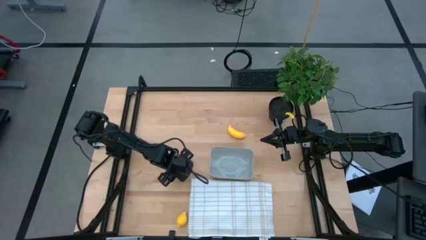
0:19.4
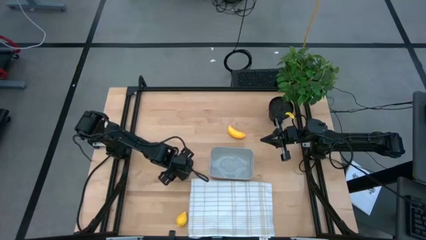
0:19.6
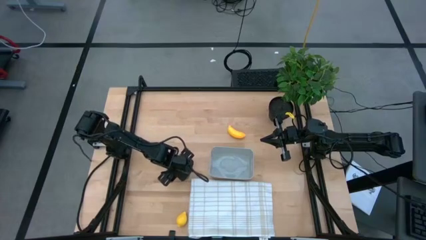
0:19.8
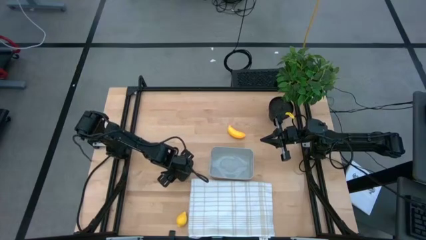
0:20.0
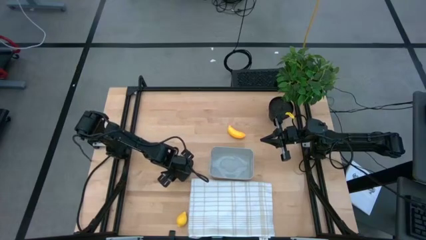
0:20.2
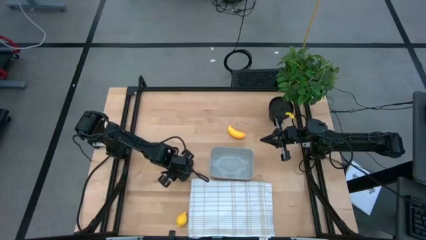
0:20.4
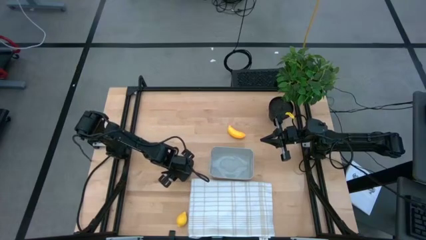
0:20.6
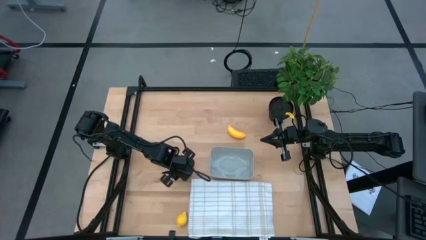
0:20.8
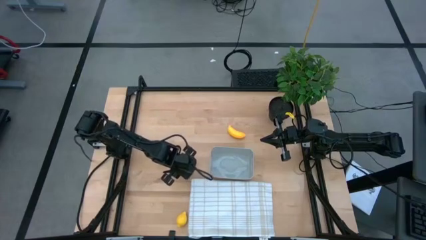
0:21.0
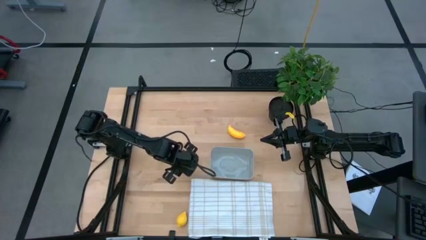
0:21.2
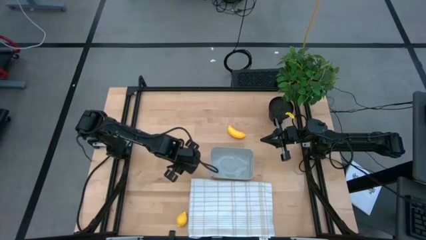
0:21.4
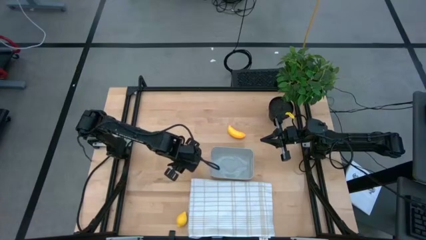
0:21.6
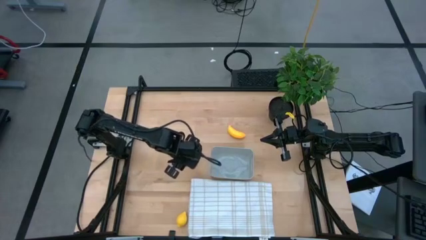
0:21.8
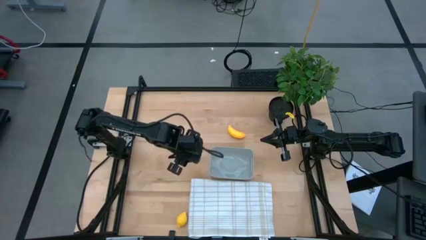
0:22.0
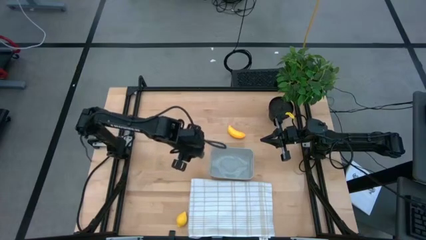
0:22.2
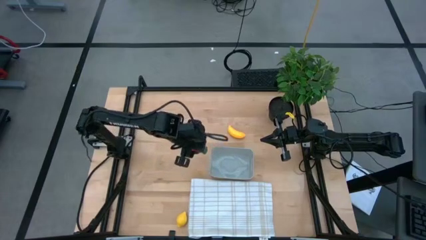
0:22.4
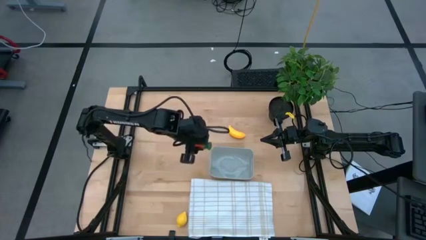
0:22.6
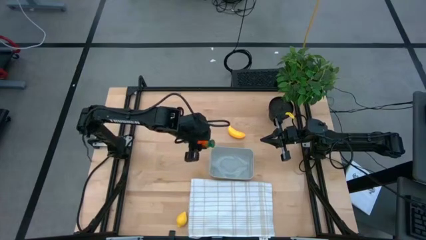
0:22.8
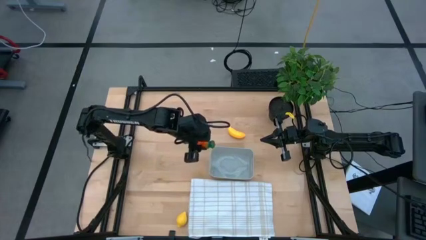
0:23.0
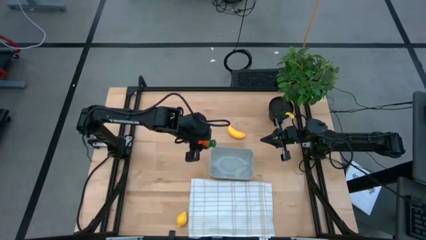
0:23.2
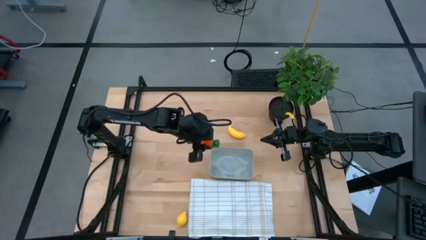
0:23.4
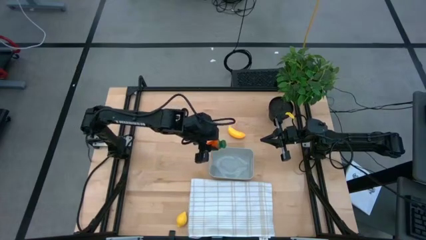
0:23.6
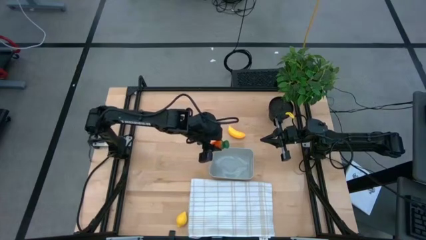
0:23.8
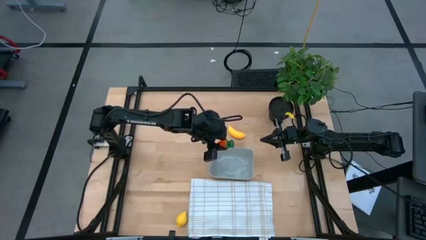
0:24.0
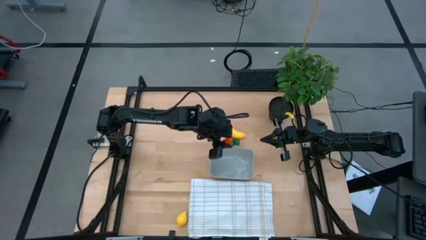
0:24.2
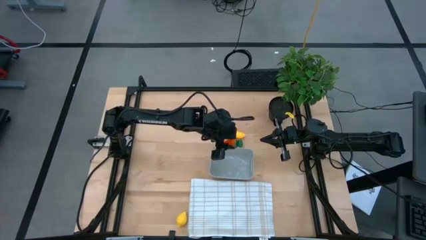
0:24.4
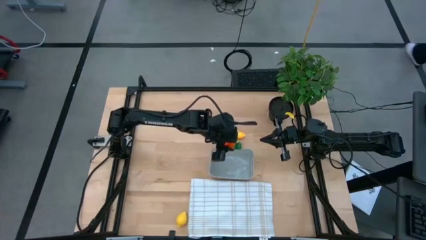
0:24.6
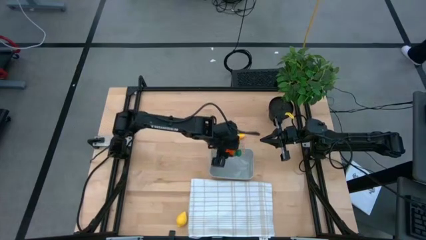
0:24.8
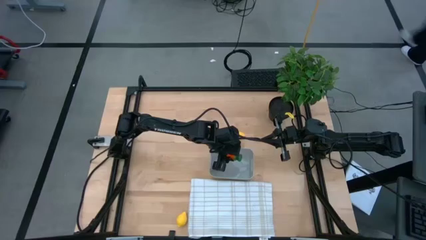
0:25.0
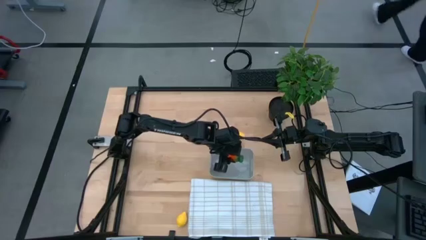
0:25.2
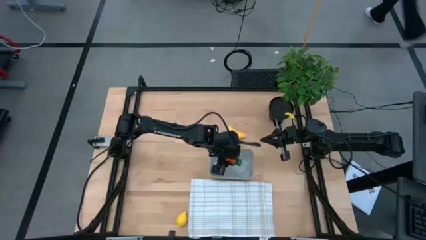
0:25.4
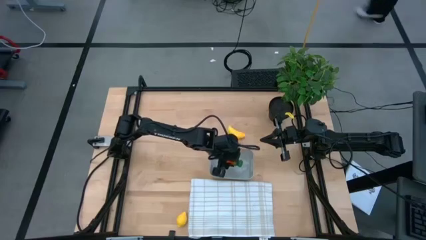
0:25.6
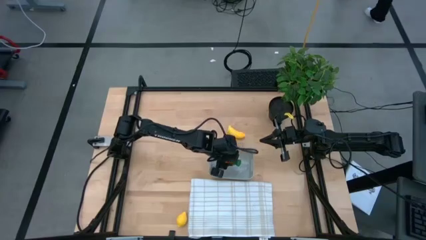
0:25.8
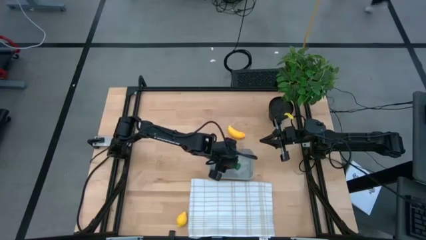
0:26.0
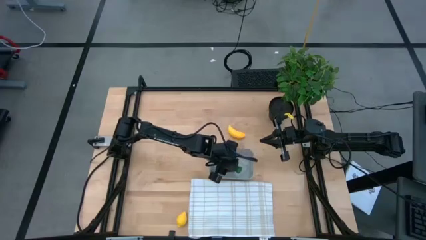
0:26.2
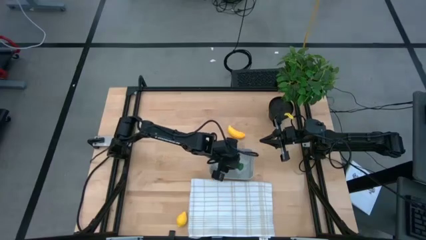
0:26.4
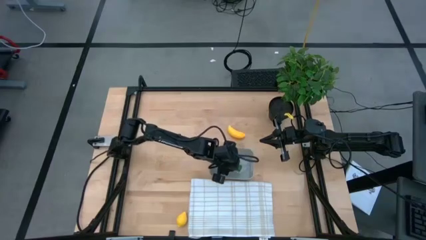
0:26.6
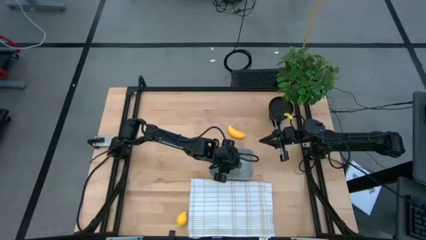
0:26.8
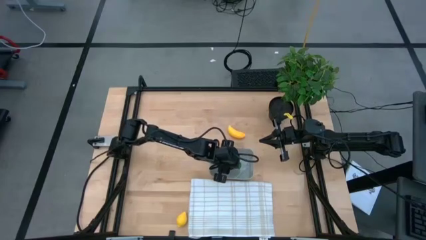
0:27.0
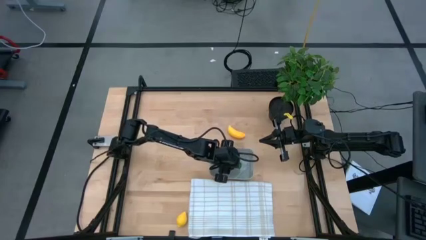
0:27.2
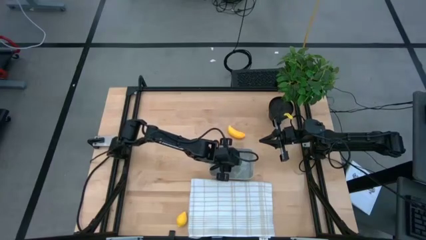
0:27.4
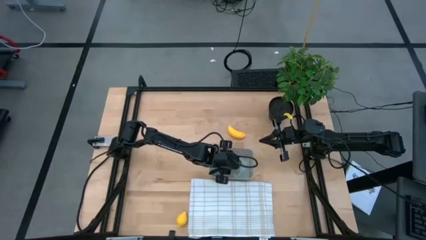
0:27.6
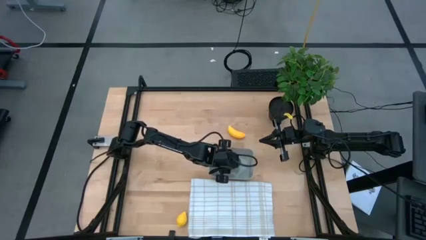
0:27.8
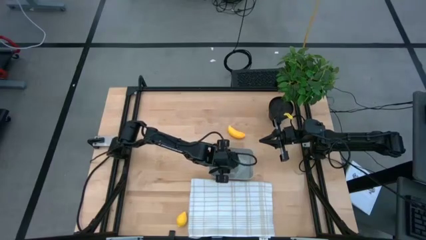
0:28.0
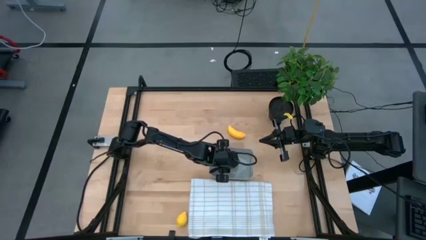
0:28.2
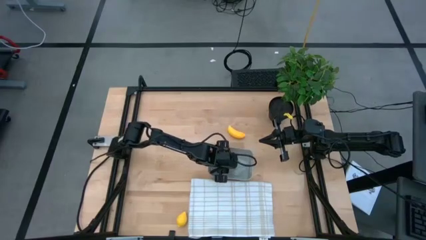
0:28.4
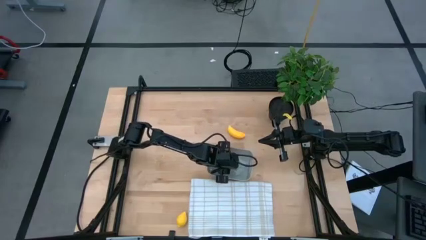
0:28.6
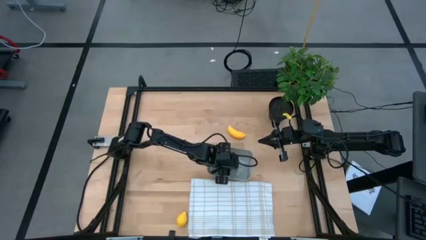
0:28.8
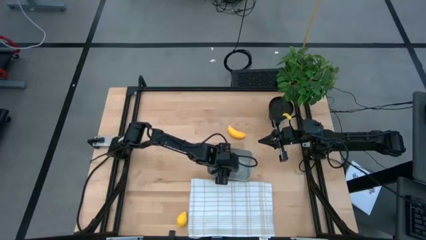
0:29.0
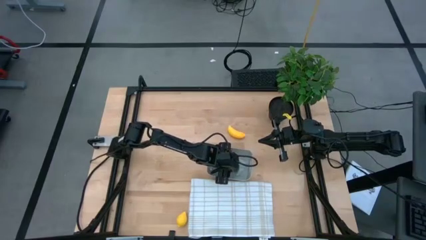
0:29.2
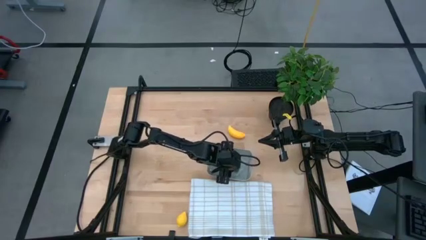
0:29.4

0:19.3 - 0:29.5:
Task: Pick and placing Produce into tupperware
Put the orange carrot into the gray bin

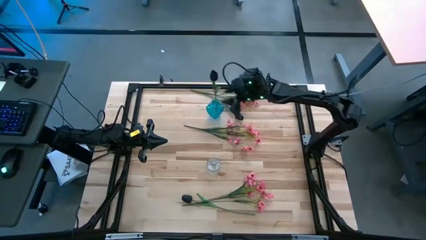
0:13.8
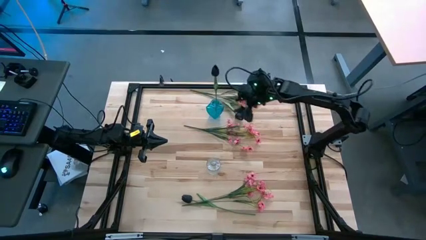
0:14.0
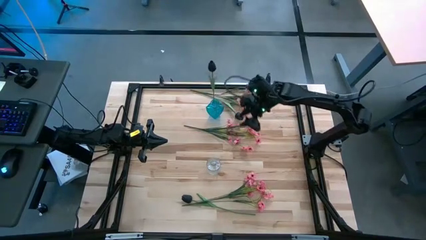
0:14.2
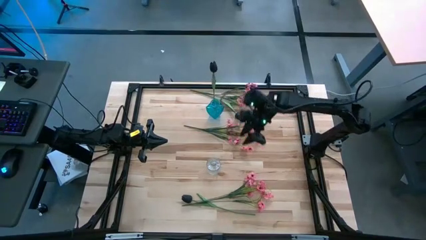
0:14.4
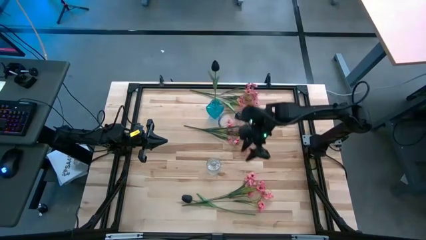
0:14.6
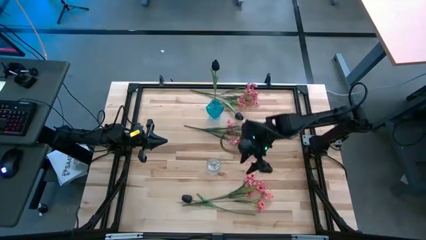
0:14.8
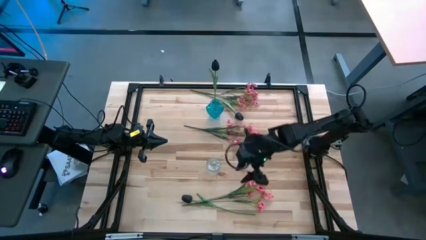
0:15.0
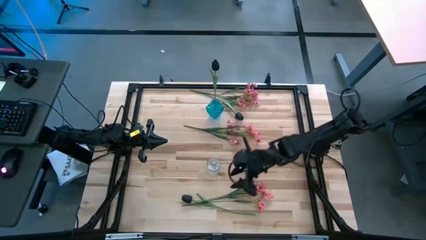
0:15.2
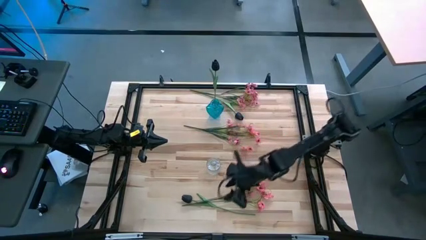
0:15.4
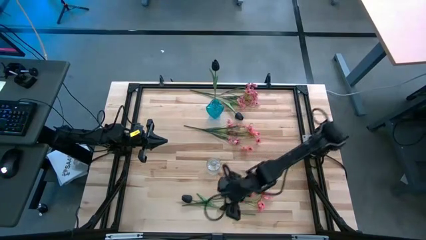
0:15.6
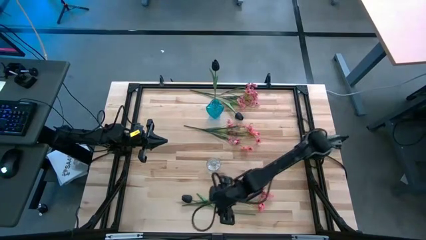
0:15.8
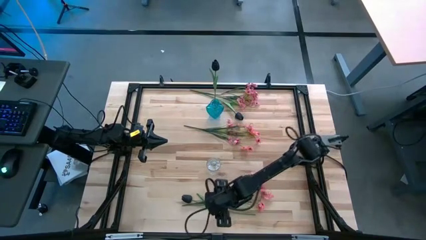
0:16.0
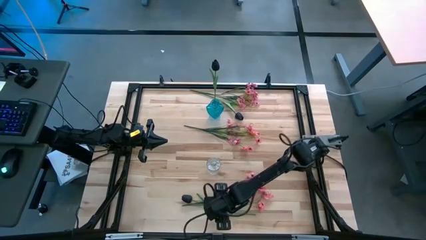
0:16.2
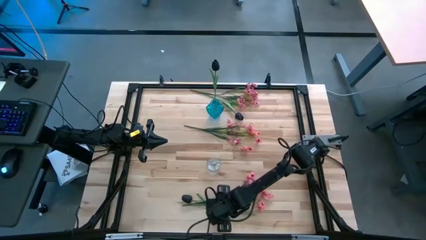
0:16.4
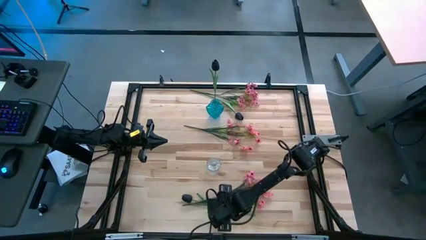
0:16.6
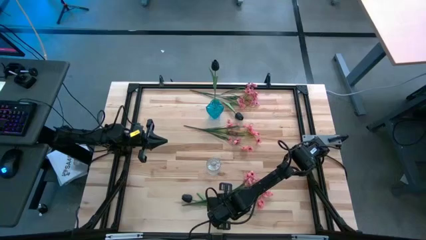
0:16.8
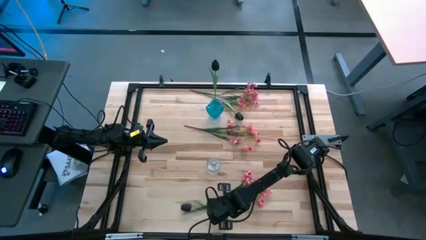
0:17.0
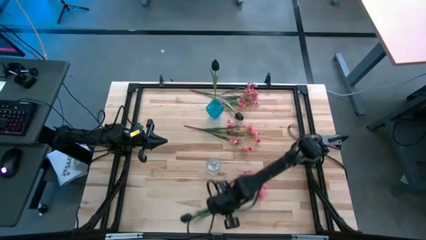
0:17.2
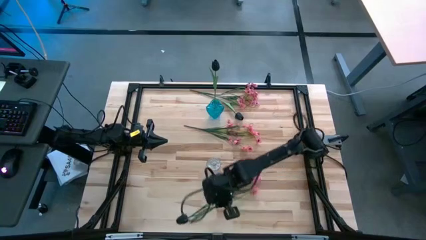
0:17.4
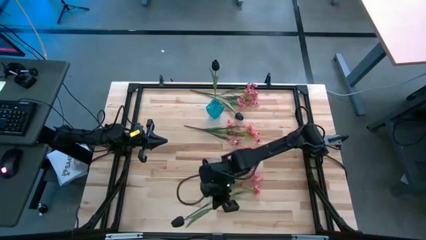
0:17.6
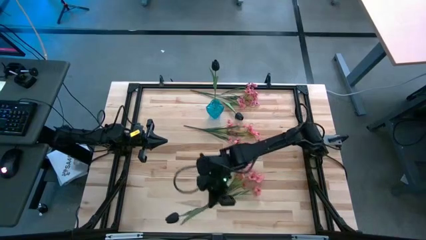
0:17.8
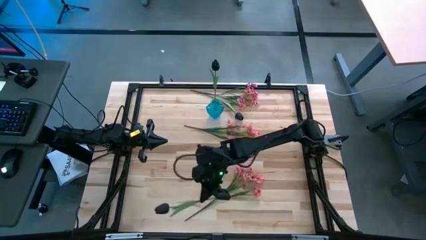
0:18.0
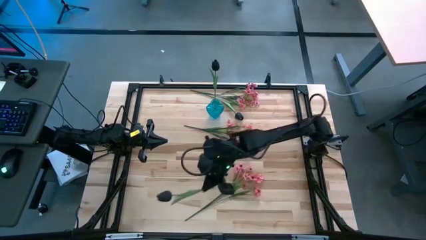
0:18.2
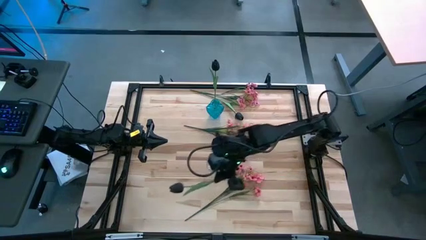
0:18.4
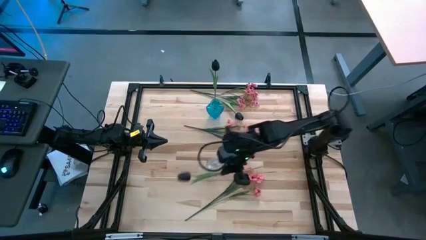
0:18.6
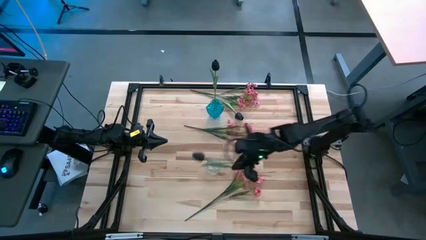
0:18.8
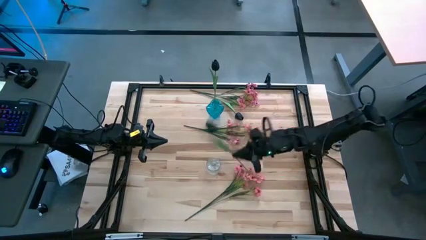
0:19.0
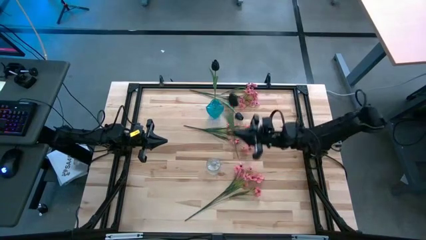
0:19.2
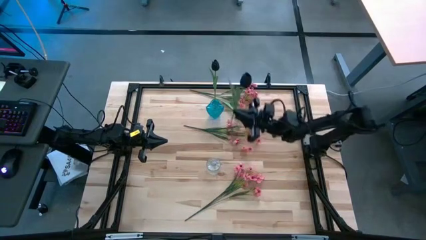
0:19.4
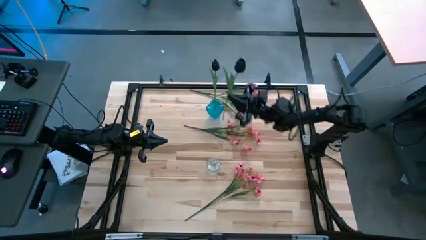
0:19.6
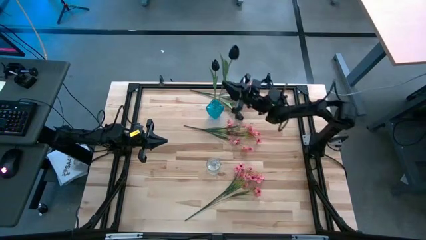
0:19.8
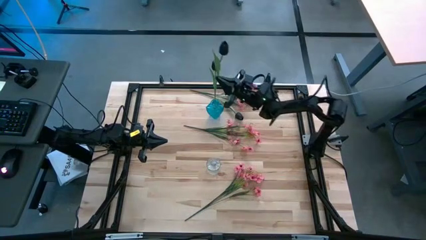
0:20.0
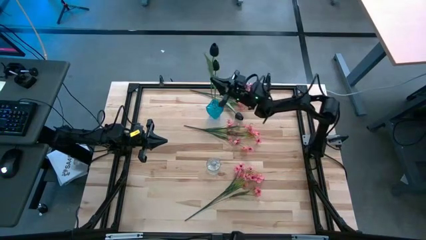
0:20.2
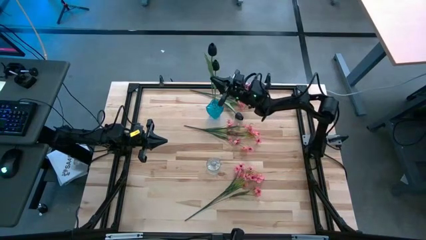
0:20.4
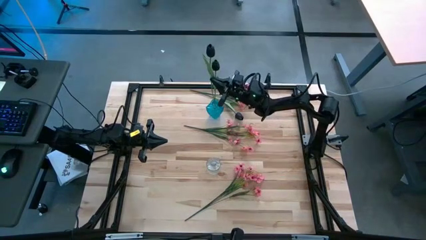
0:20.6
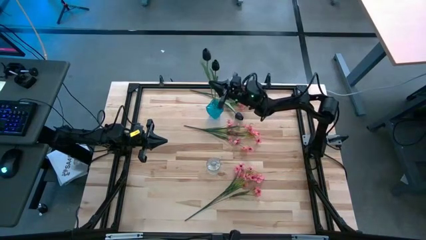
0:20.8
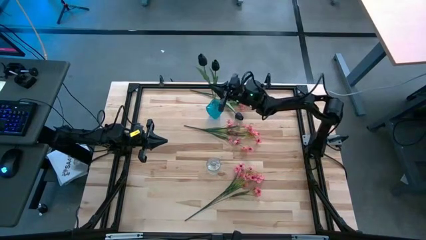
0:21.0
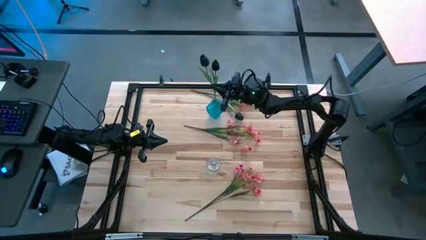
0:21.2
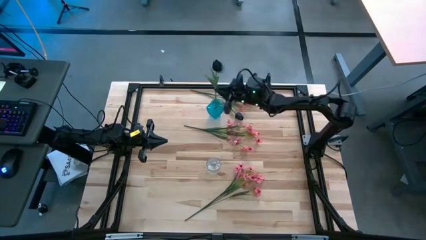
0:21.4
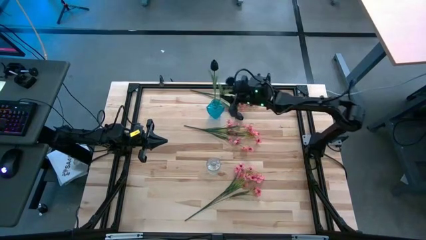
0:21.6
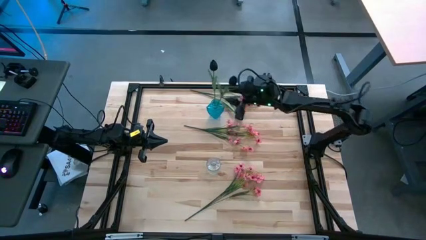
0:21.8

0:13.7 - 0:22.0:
Task: Sort flowers into vase by color
Put the bottom black flower into the blue vase
